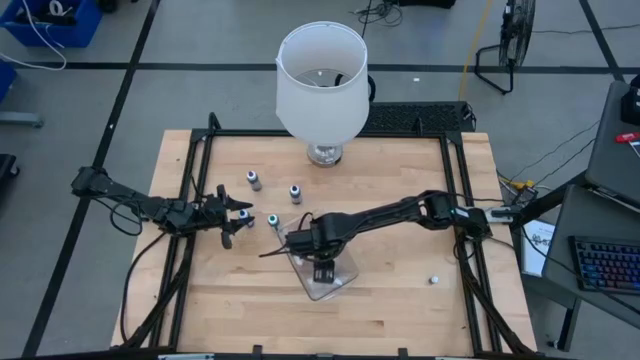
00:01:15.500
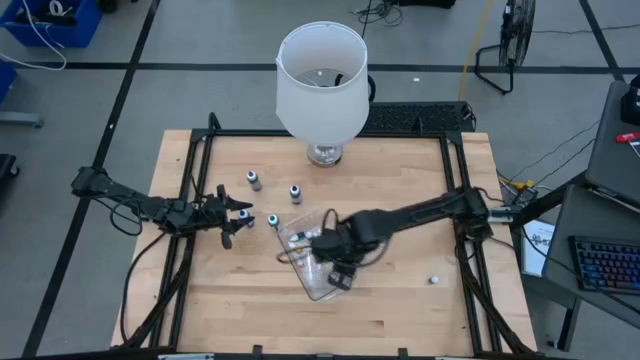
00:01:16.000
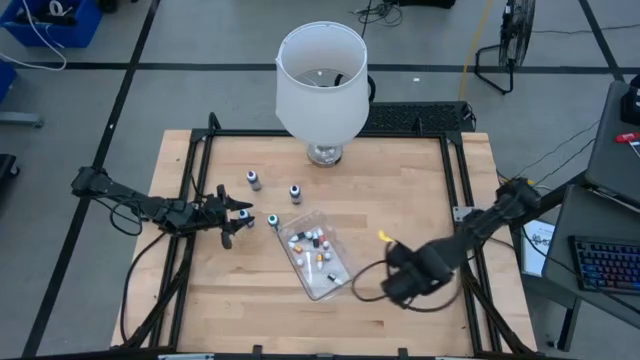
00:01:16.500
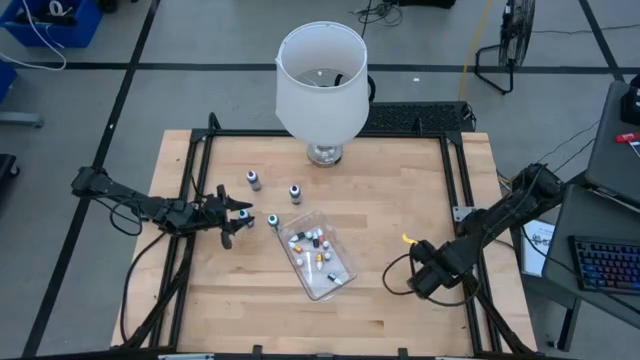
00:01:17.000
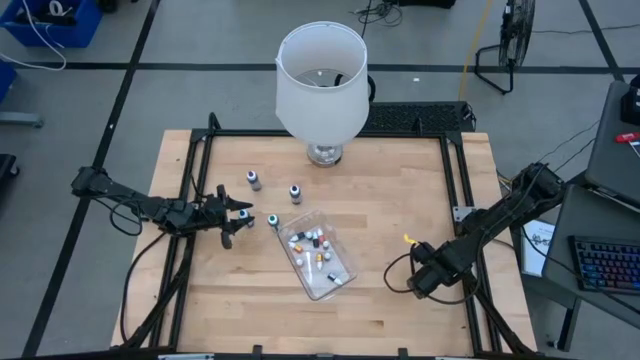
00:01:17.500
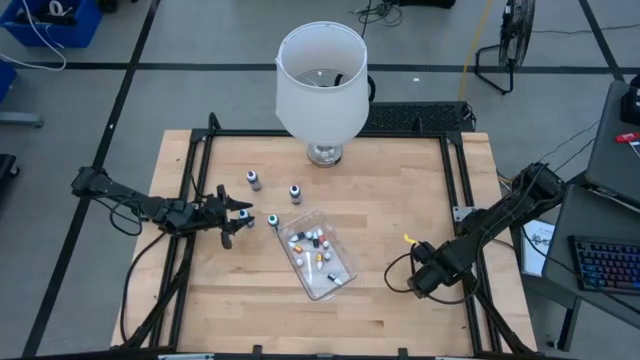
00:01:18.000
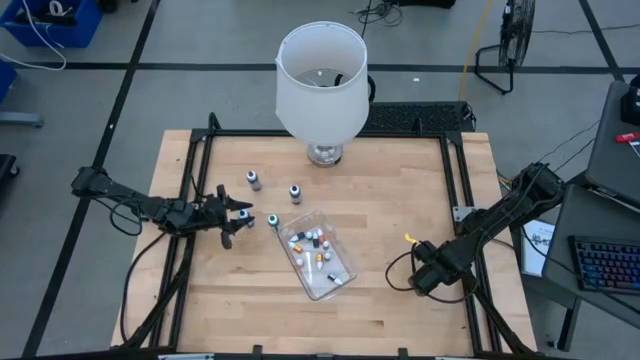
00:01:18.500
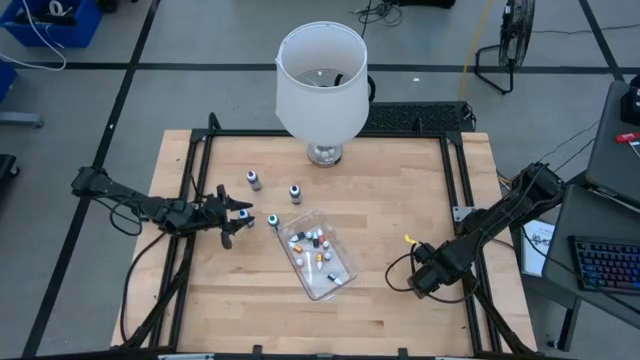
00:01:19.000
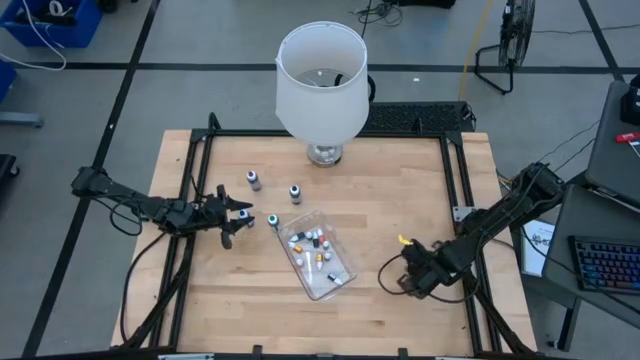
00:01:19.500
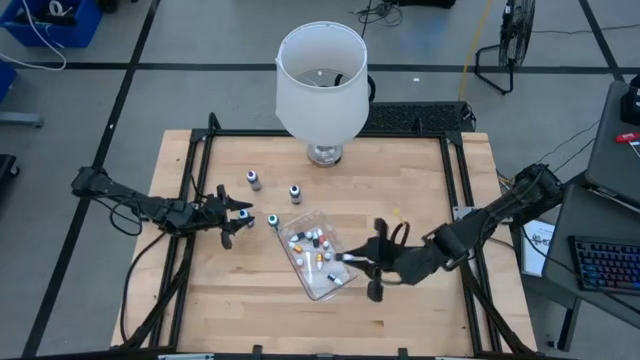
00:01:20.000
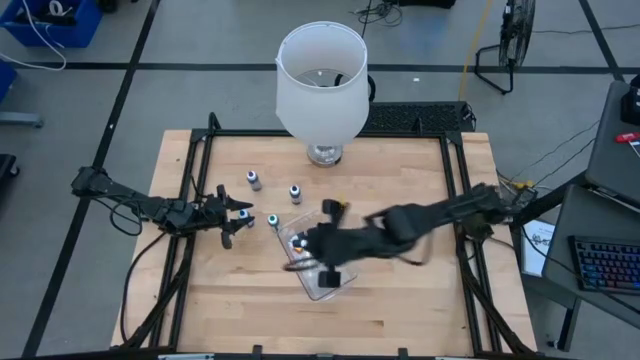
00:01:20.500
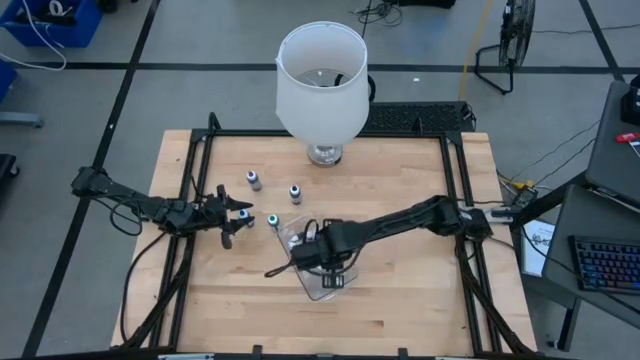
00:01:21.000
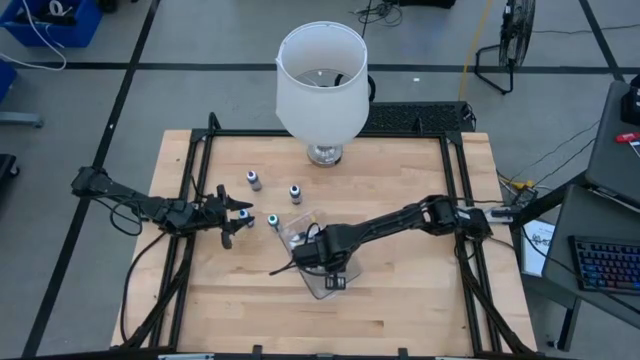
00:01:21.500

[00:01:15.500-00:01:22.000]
Task: Pick & Place food coloring
Put the violet food coloring bottle into the bin

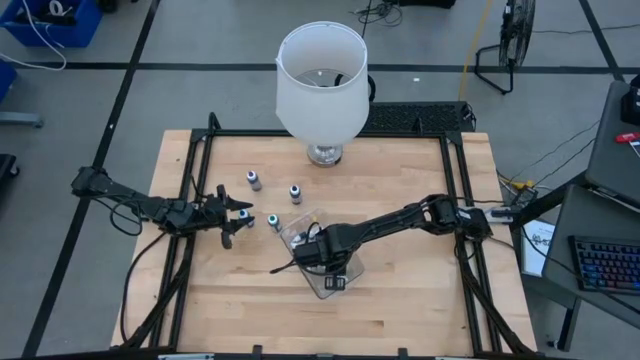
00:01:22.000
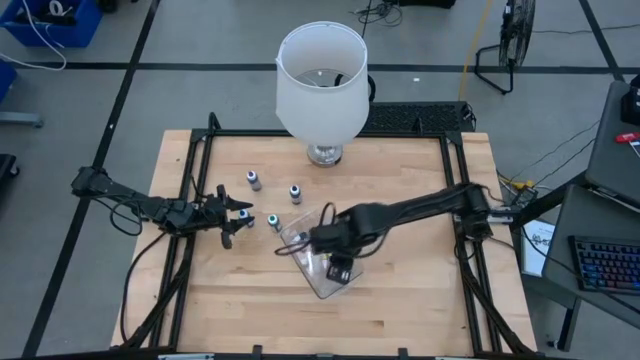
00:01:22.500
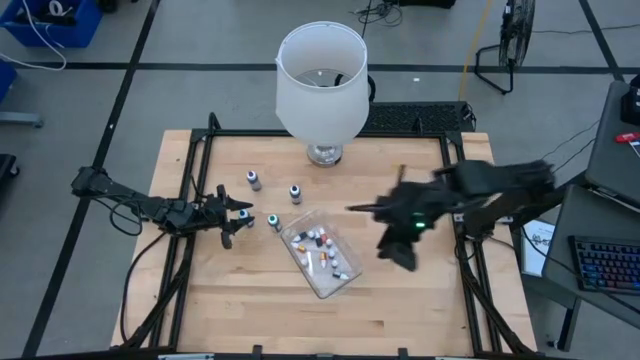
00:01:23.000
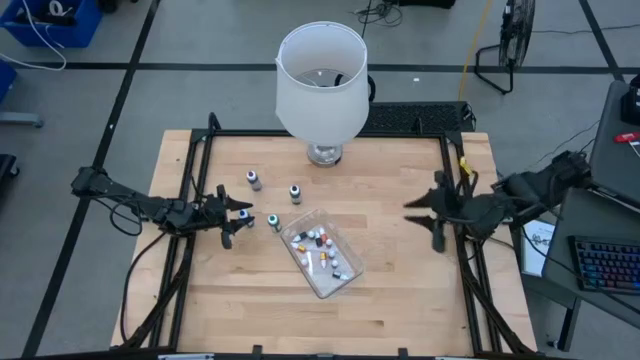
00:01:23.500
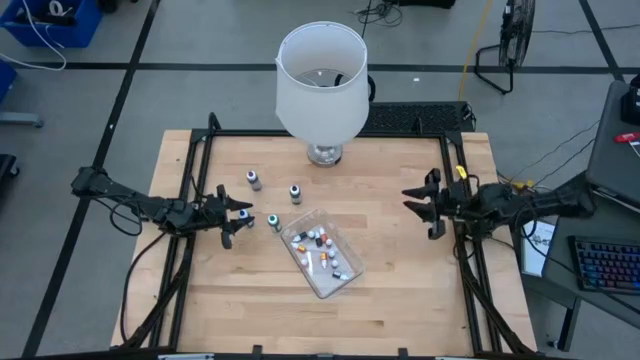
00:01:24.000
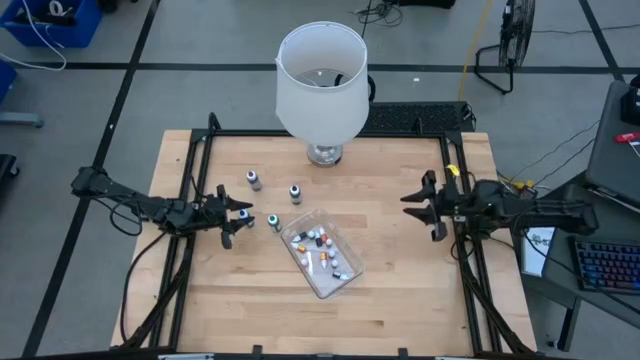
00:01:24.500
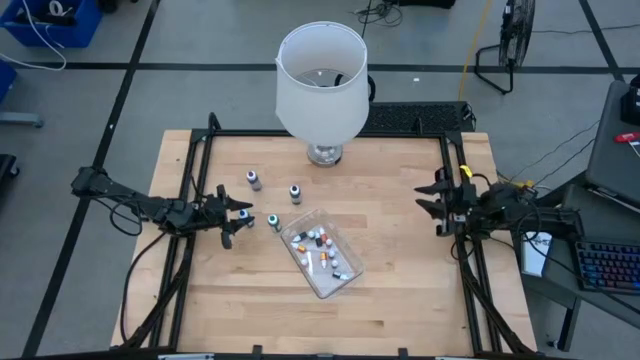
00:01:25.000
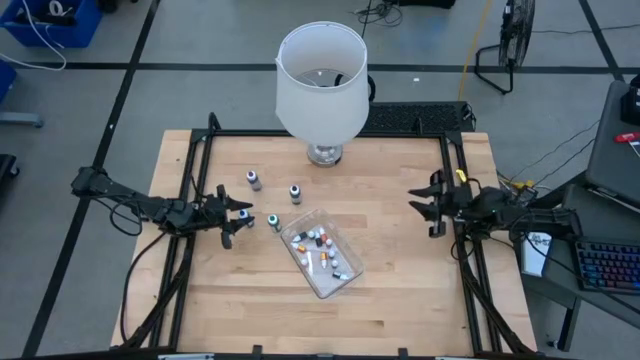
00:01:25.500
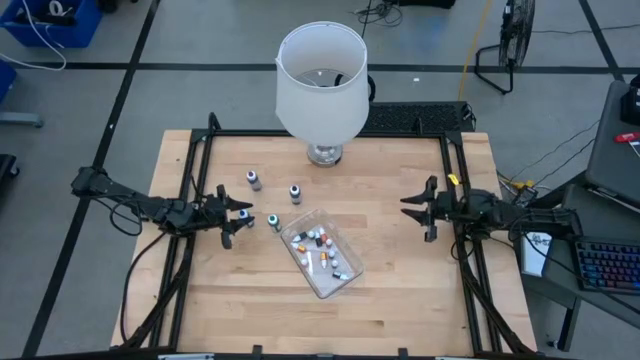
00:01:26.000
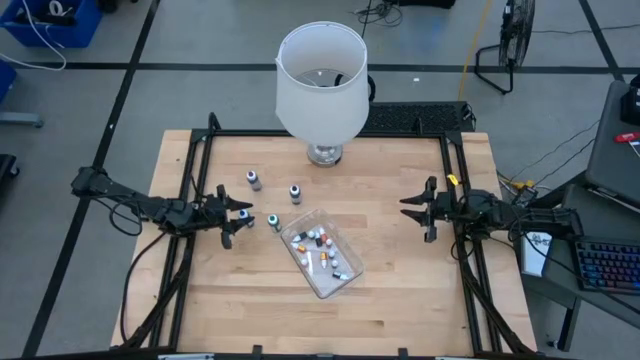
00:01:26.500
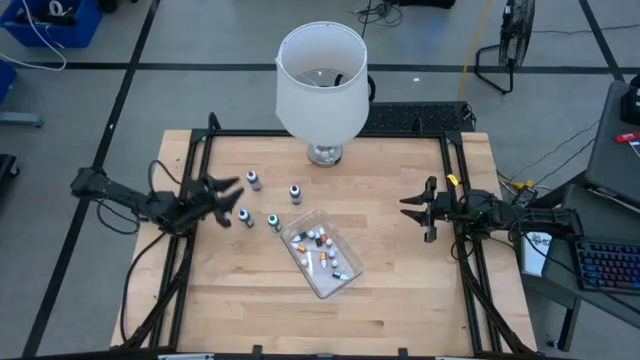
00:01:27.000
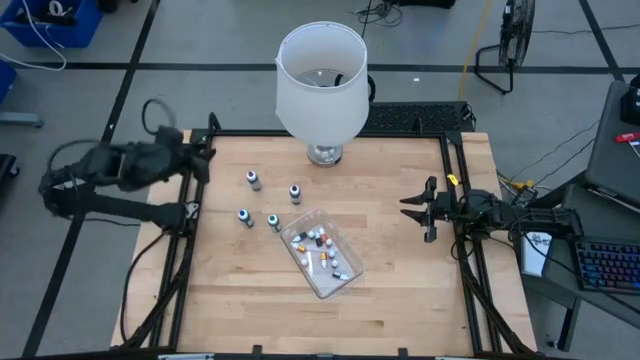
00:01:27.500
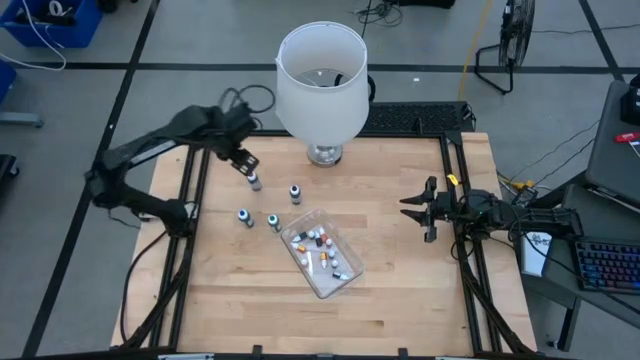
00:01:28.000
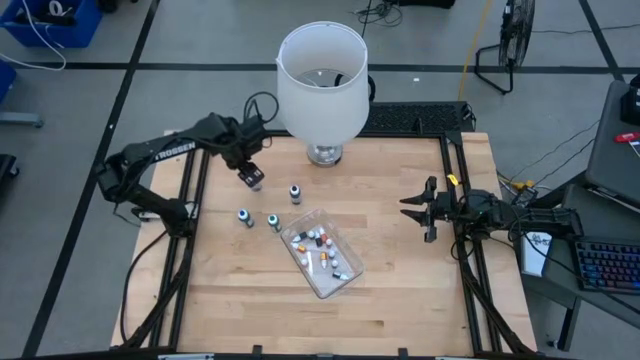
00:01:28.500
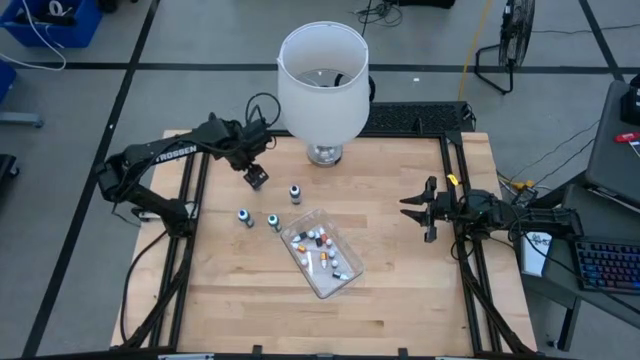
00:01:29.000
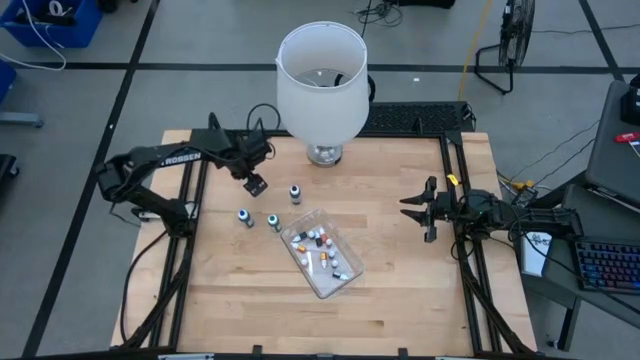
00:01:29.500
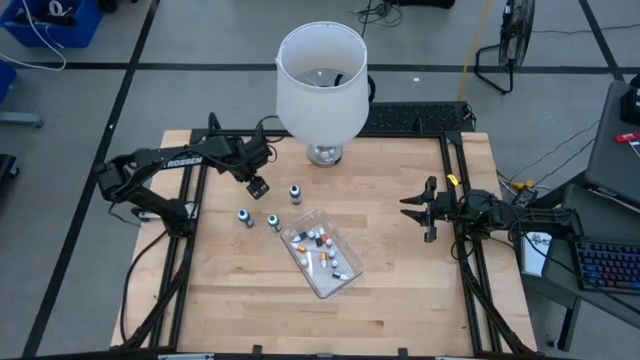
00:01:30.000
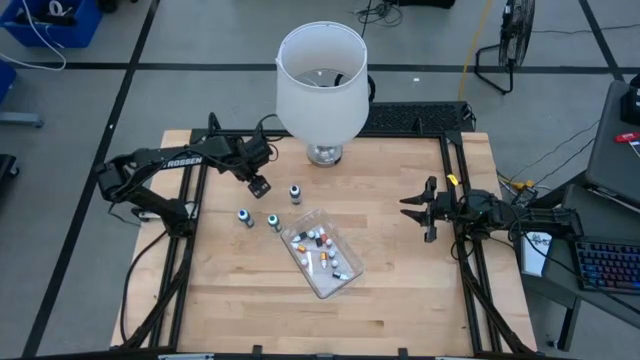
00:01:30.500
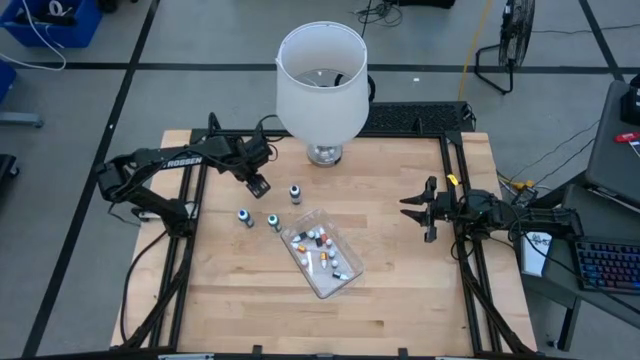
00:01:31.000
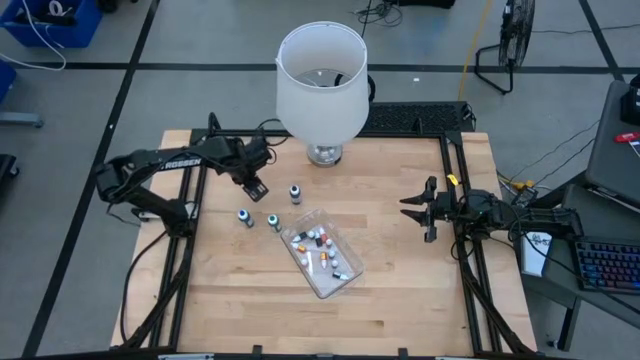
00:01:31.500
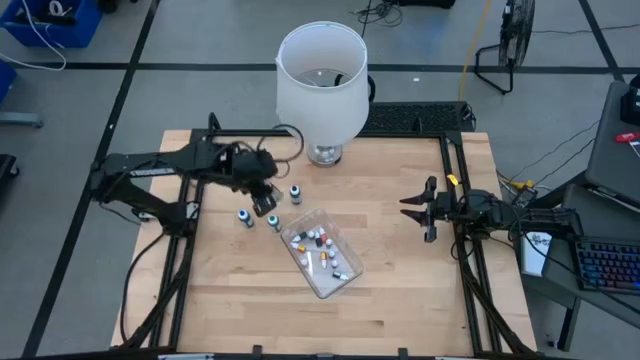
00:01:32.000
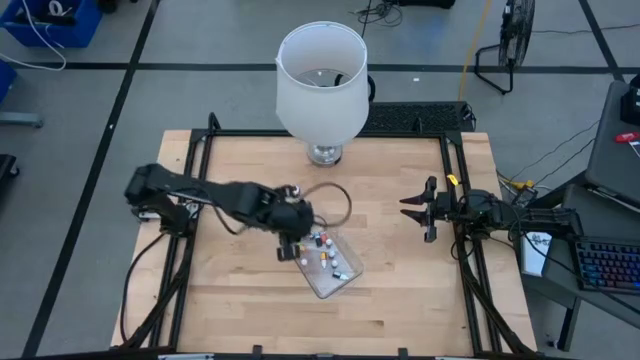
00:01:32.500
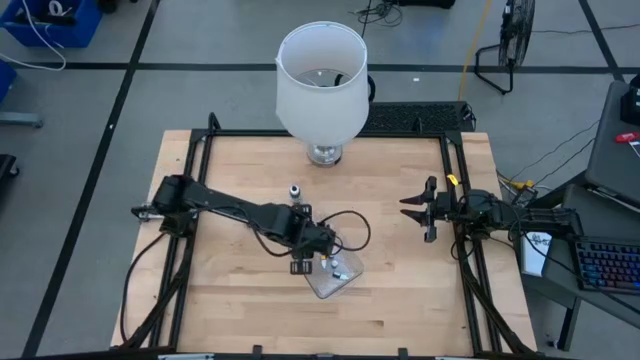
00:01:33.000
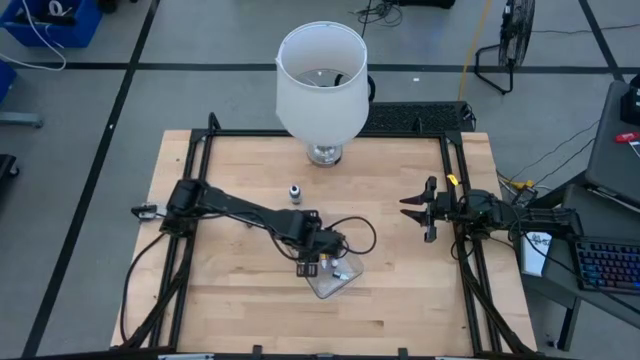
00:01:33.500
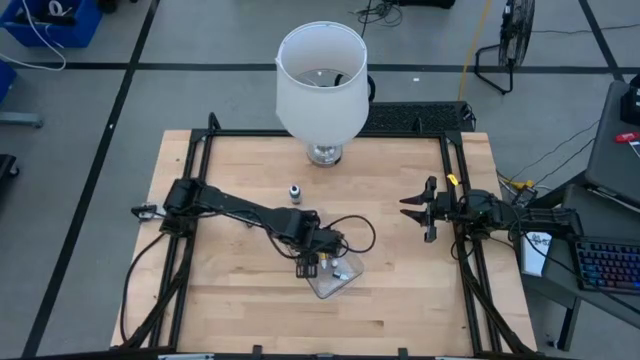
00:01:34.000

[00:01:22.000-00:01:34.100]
Put the violet food coloring bottle into the bin

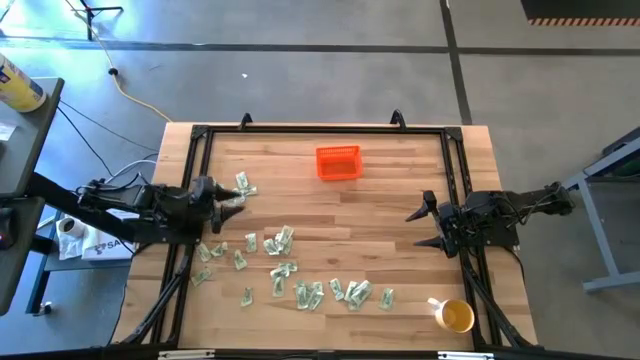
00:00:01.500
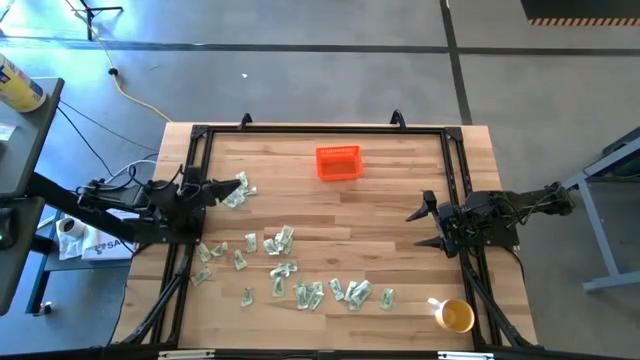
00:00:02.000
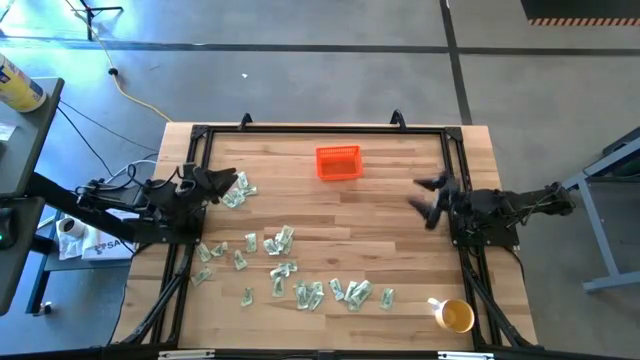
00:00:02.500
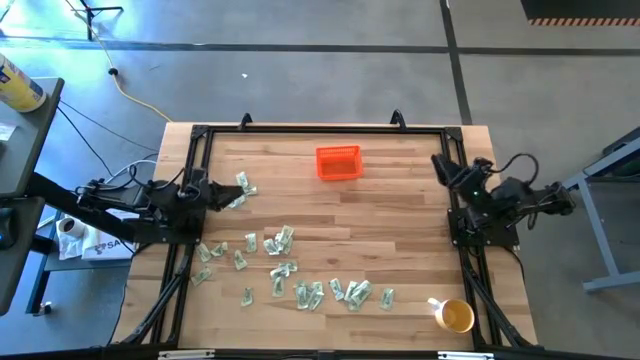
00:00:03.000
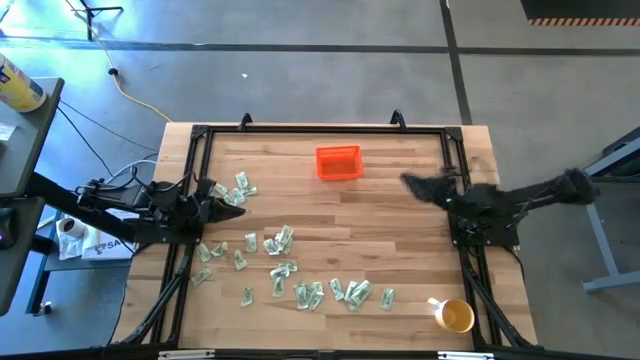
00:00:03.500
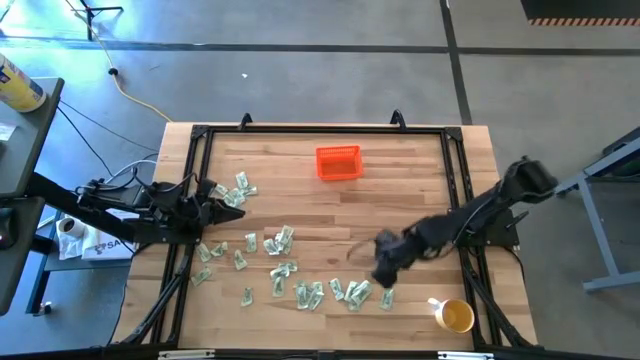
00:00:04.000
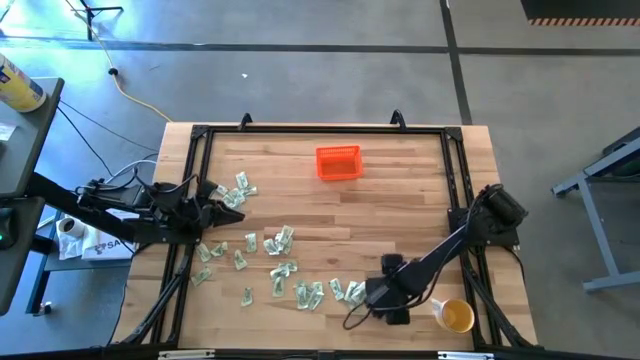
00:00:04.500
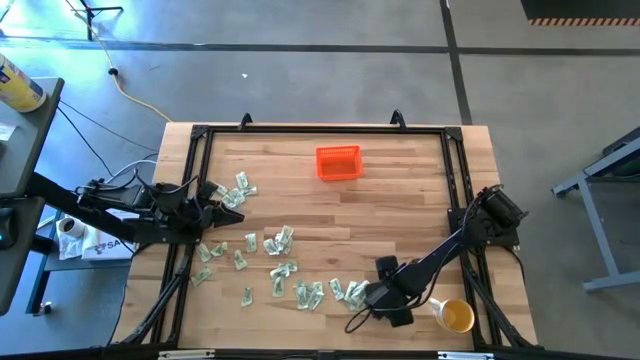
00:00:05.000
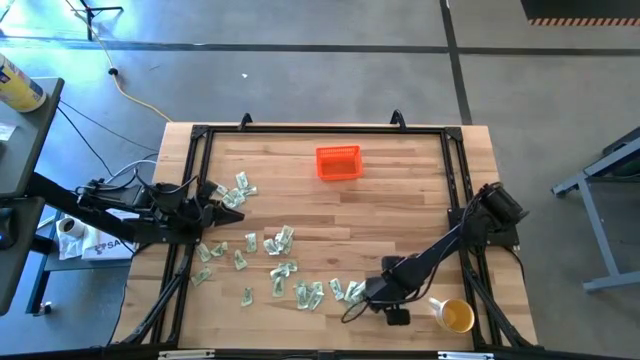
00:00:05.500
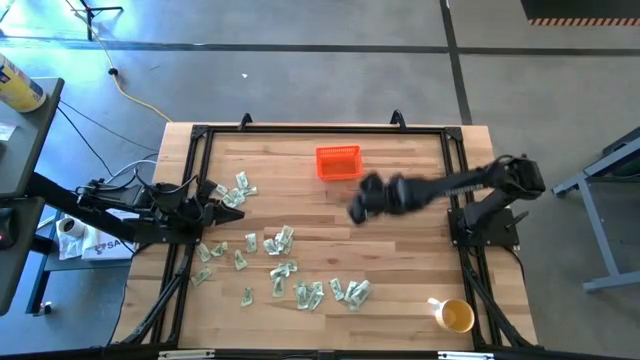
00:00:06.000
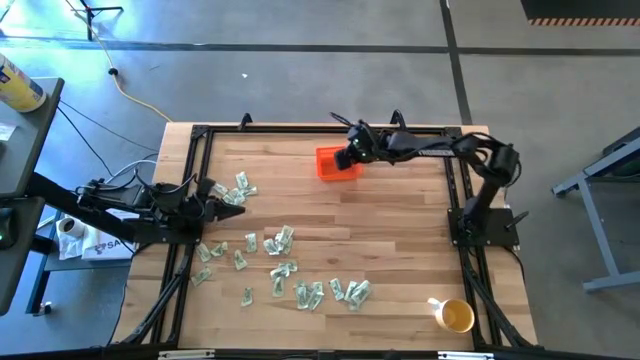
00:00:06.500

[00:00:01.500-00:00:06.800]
Task: Pick and place Stevia / Truvia into bins
Put the green stevia packet into the orange basket
